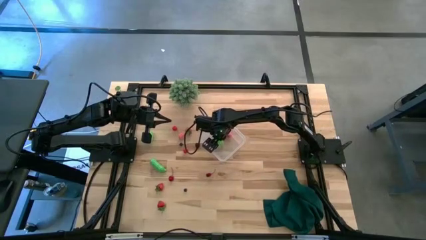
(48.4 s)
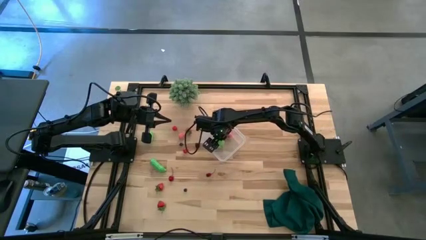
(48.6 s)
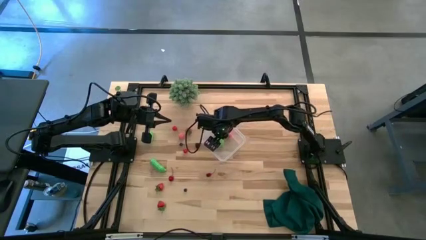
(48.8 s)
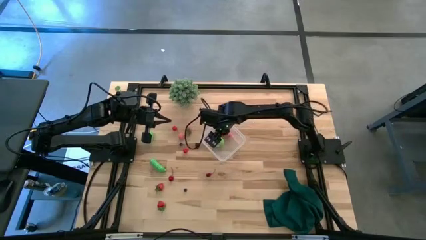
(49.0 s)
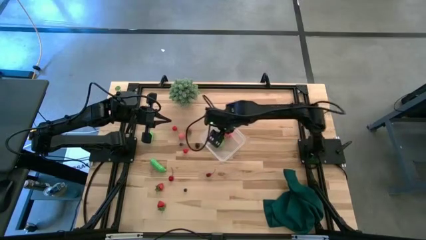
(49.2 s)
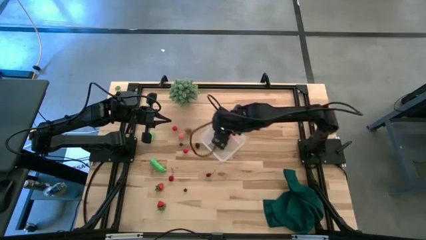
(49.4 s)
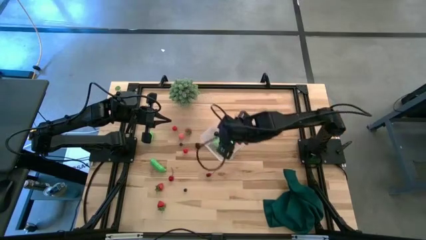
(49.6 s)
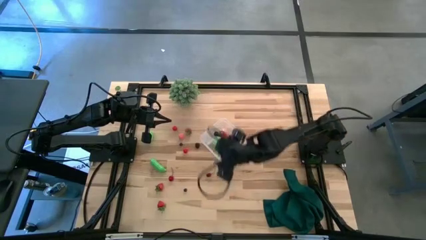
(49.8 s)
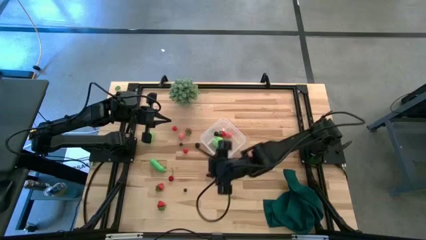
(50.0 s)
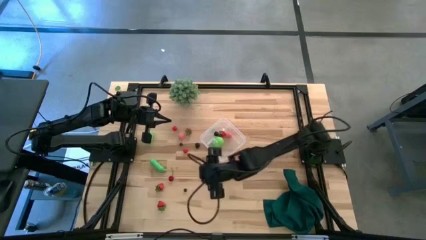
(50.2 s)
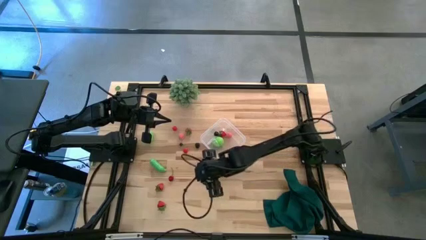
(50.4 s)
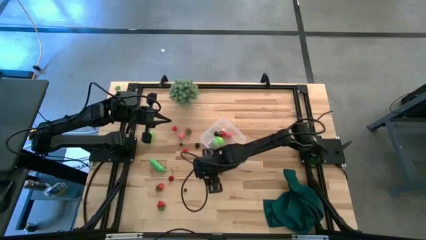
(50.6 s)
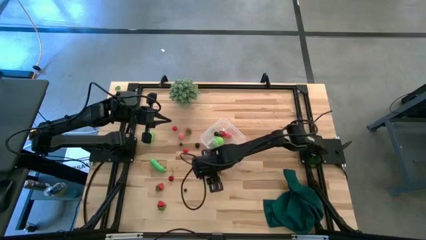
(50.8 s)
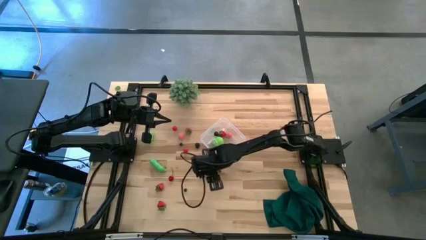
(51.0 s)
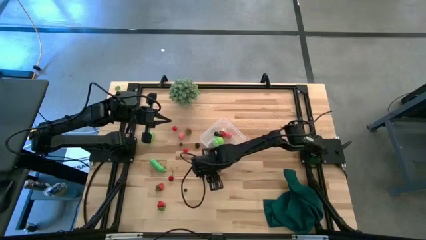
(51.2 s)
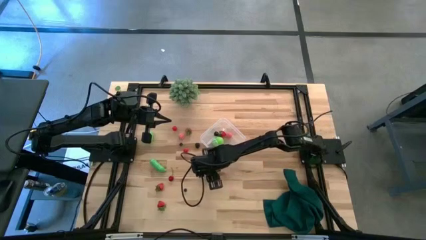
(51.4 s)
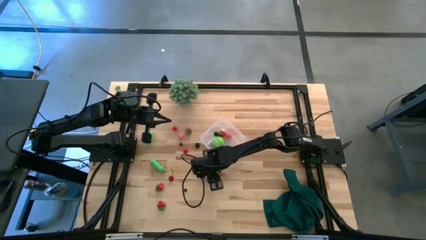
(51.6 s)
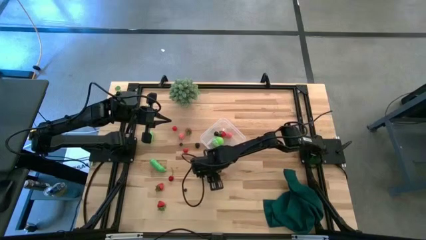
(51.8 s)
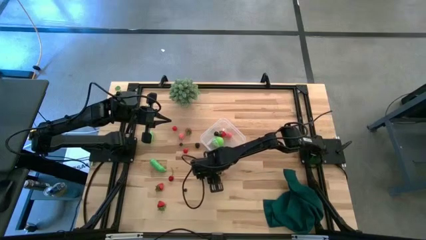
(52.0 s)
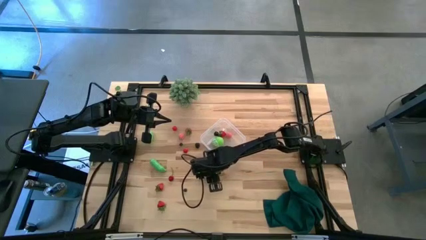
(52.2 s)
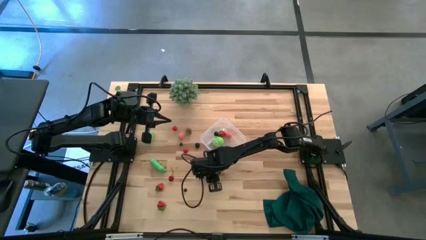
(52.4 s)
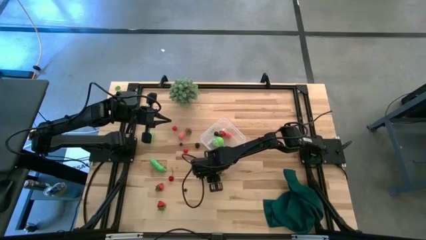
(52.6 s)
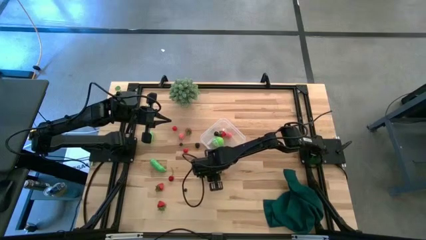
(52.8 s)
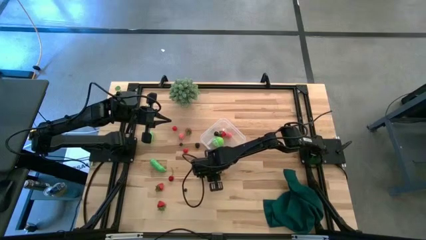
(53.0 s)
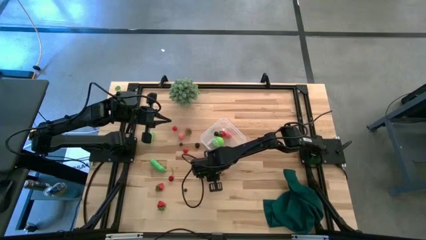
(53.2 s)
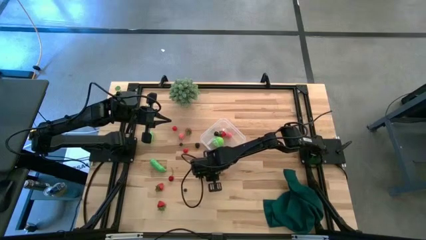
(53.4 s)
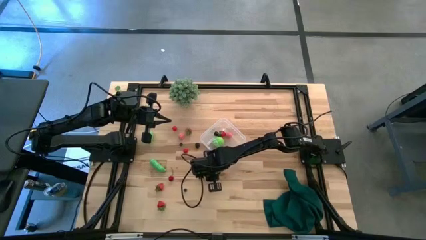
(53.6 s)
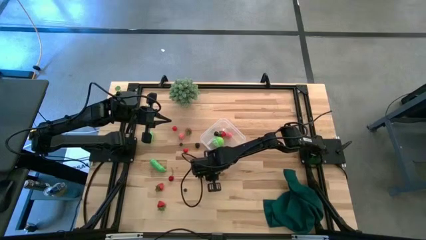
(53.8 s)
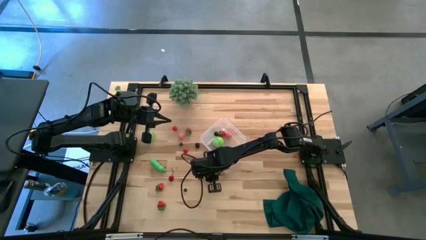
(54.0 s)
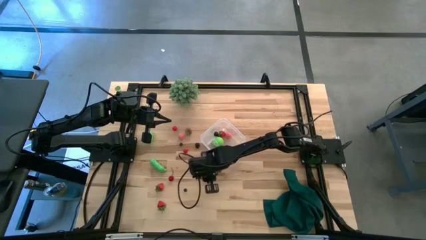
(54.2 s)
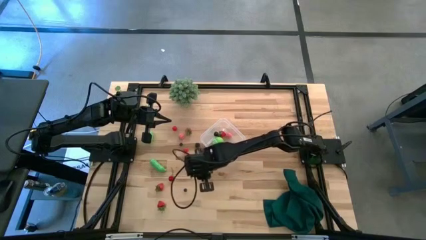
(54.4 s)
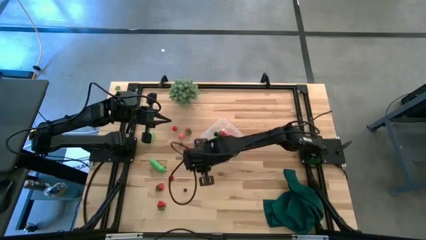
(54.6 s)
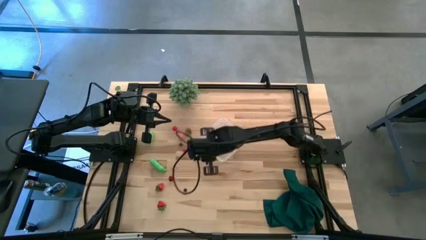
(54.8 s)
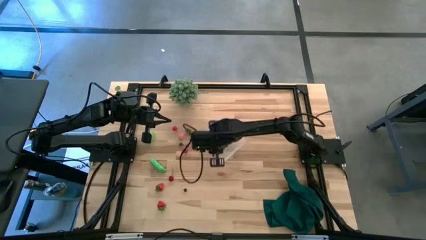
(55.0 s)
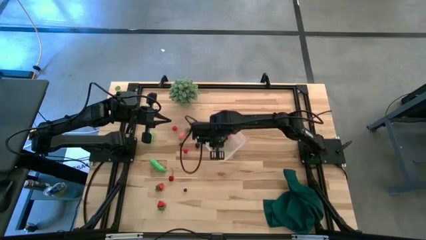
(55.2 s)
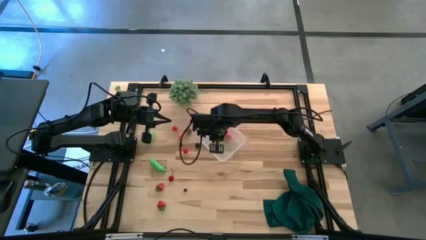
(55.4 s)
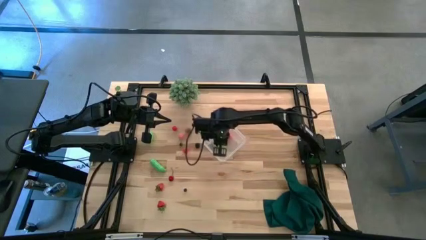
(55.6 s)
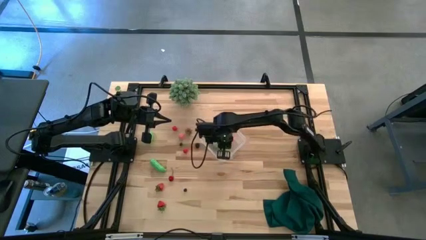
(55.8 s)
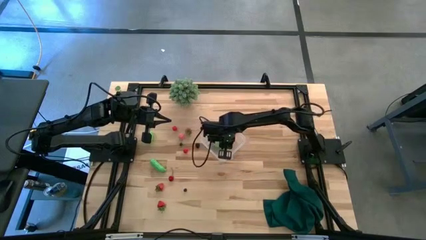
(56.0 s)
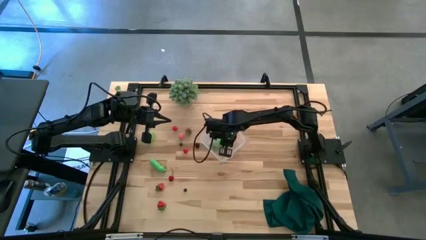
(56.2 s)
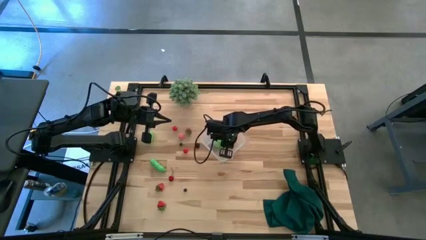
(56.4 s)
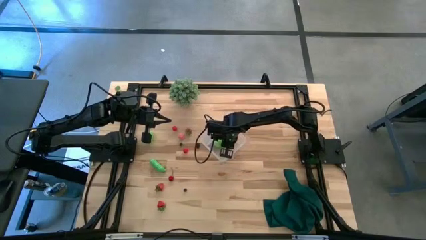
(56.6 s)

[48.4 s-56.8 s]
Task: Pick and placing Produce into tupperware
Put the red cherry into the transparent bin

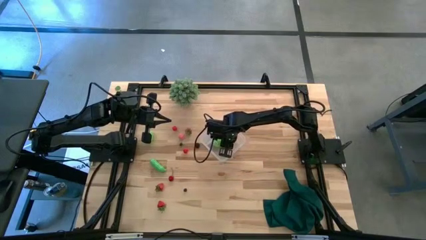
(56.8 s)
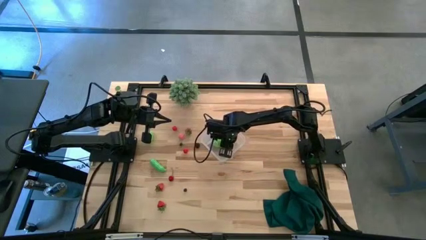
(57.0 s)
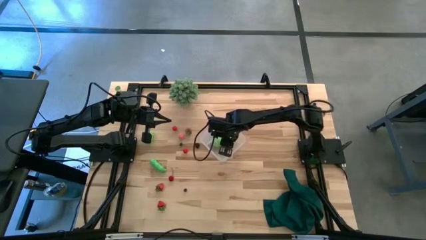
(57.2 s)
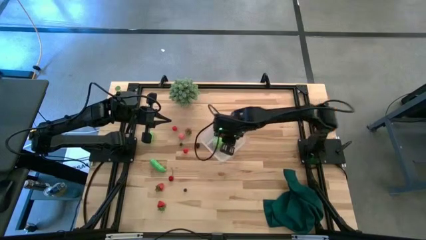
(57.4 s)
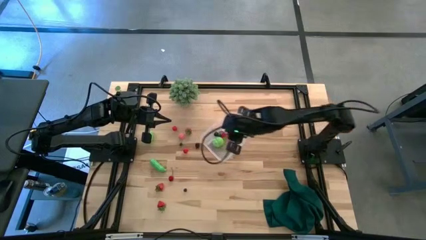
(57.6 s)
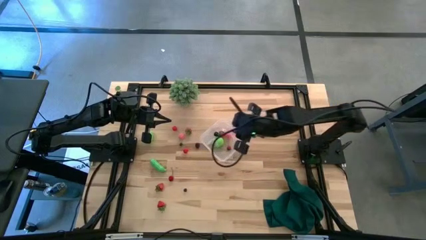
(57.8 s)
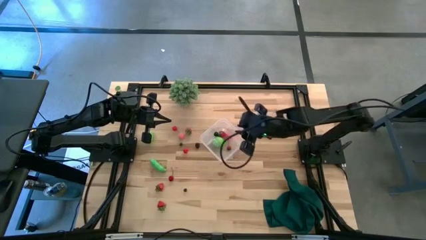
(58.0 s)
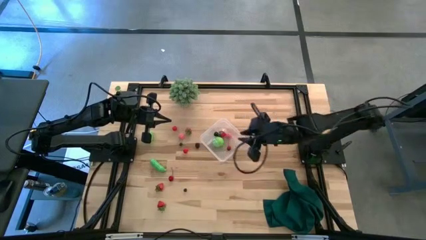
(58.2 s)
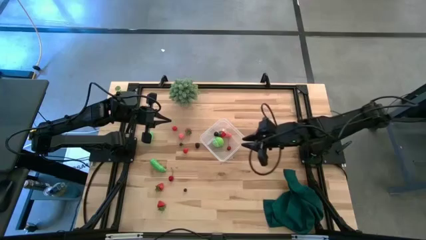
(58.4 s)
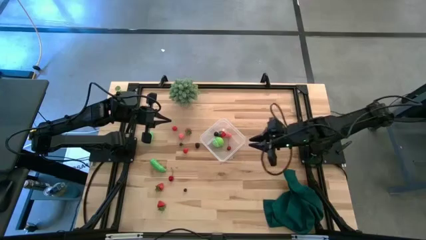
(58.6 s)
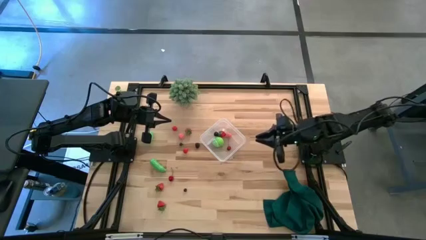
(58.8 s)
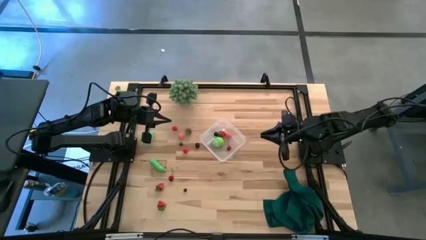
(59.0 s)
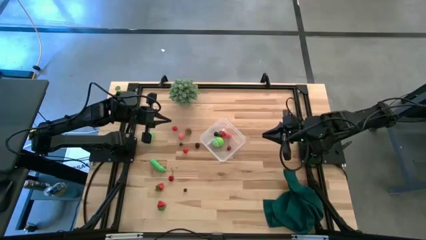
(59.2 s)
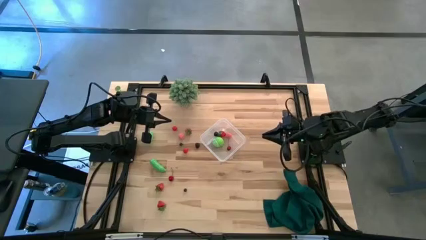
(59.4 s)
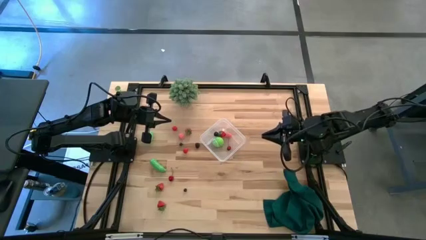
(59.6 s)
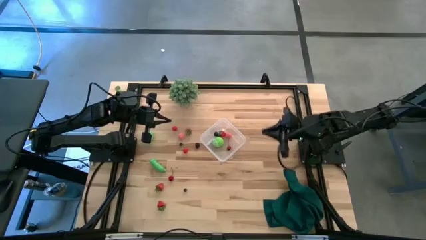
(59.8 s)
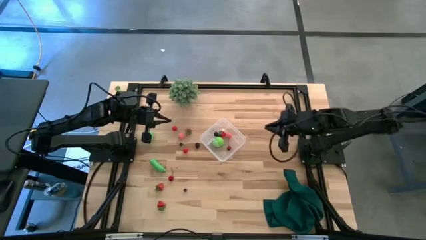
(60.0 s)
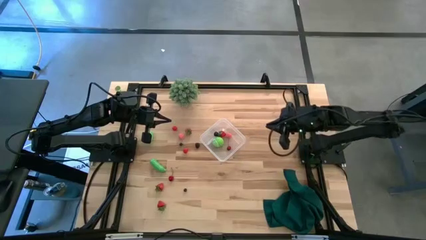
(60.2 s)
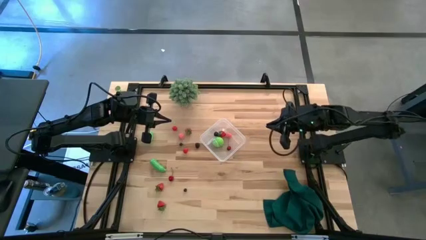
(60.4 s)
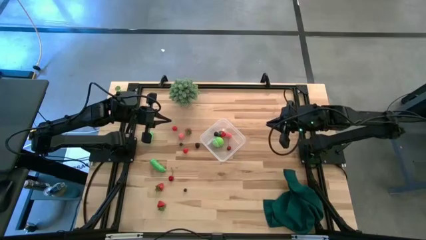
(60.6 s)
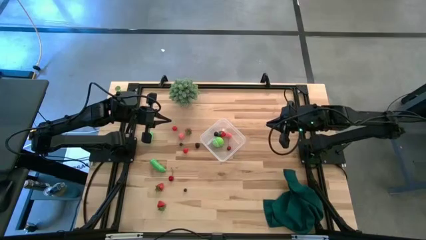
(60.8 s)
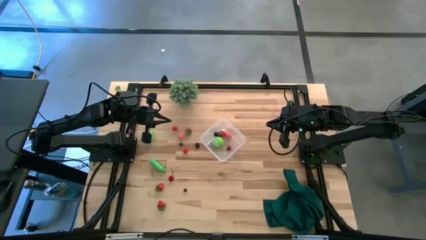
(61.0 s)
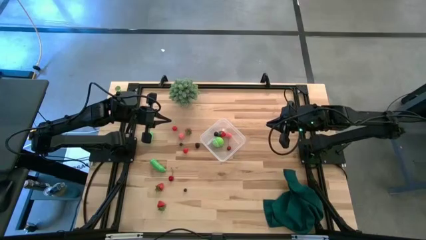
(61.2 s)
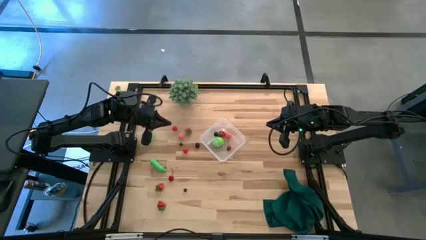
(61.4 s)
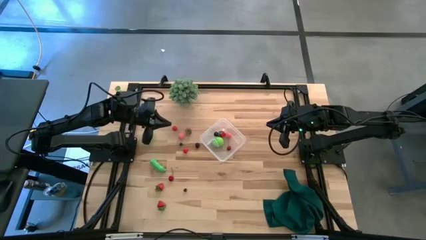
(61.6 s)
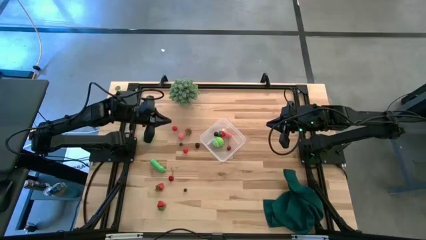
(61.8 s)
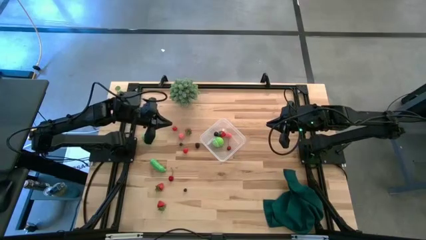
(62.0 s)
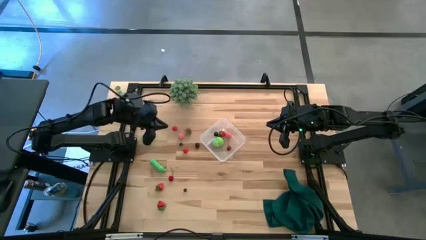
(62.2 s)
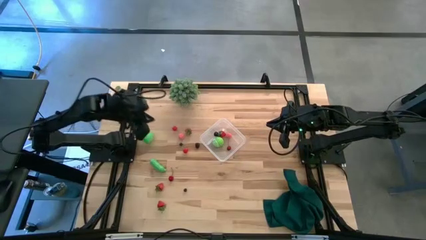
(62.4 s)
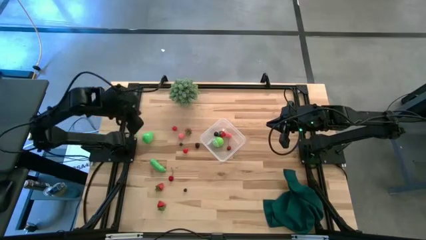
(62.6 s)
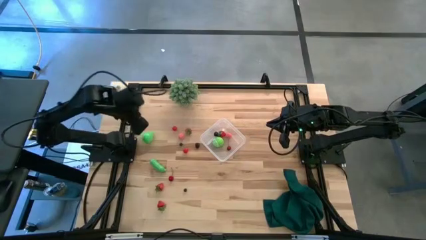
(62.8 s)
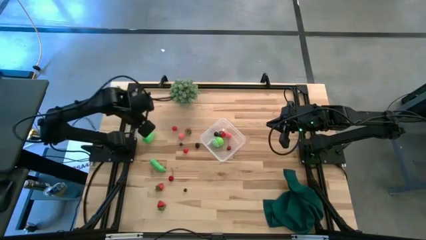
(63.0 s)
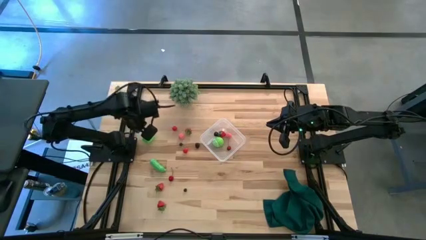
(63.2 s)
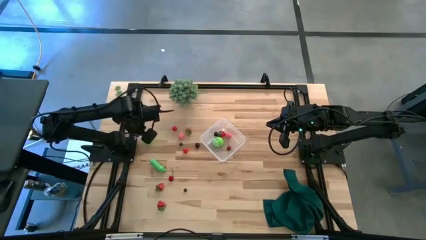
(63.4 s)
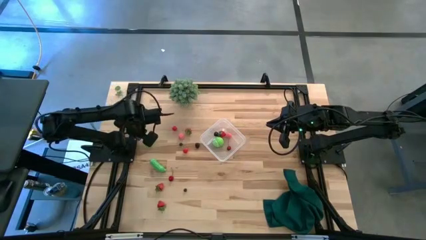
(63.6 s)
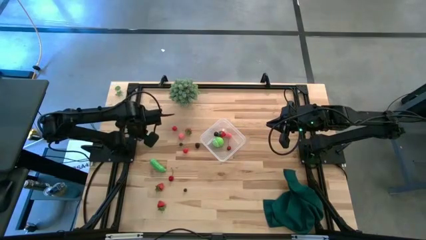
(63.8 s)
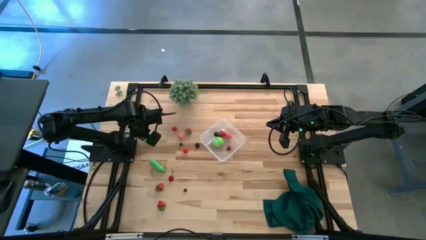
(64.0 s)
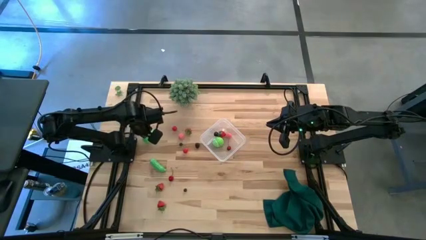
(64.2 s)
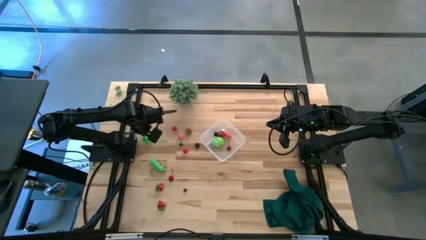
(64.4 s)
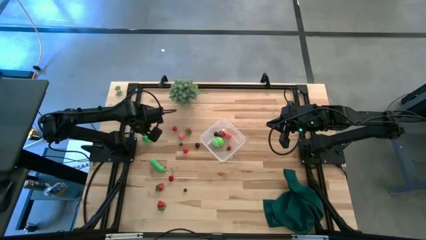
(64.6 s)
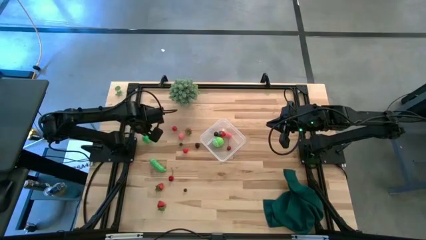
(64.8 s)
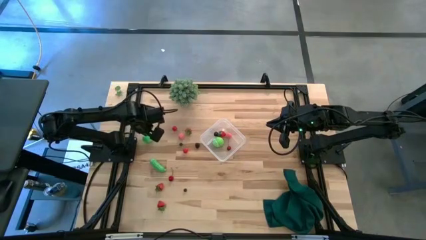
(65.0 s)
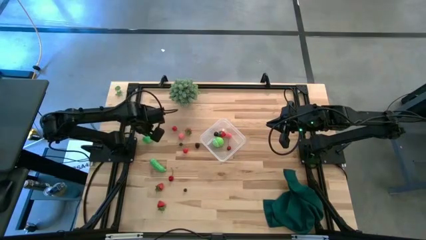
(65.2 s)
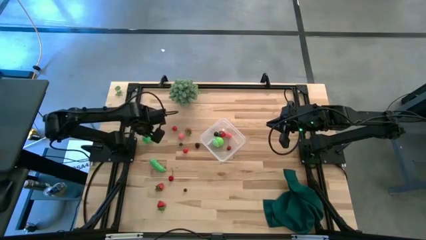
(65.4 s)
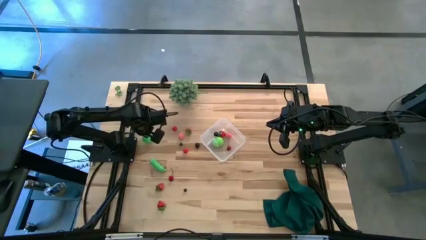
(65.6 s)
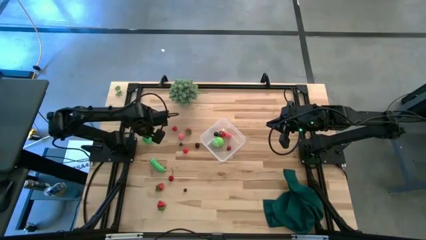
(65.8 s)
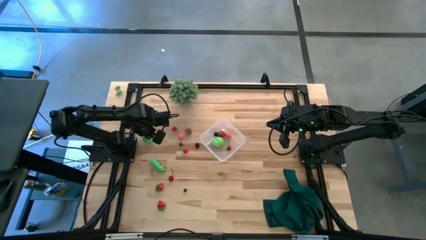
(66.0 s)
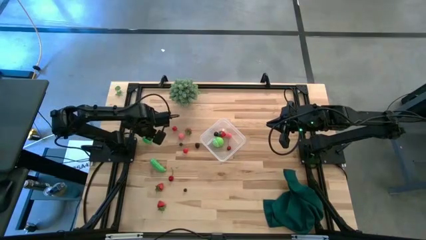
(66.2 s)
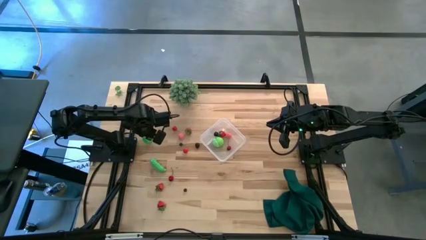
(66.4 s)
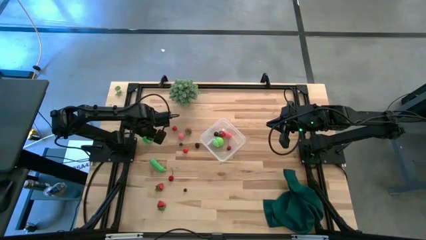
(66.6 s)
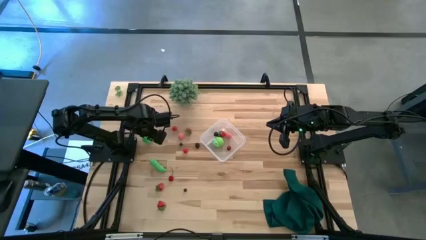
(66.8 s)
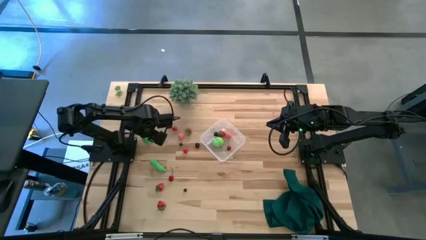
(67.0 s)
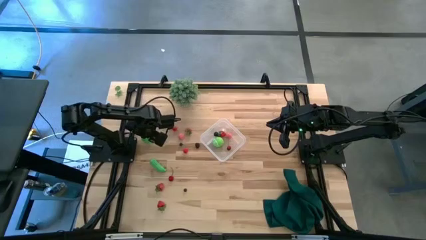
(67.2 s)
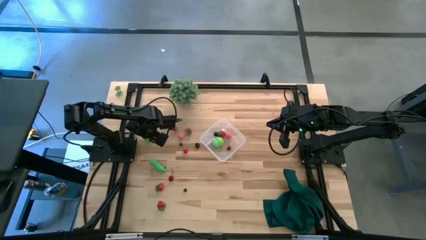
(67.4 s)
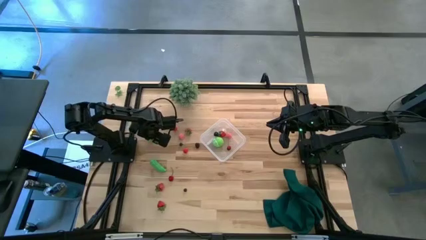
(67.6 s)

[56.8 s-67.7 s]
Put the green pear into the transparent bin
